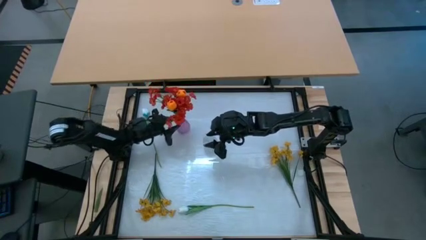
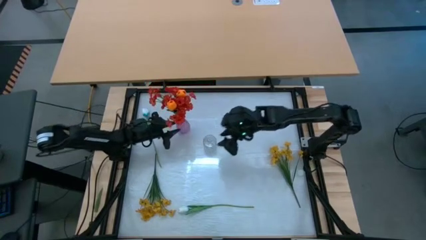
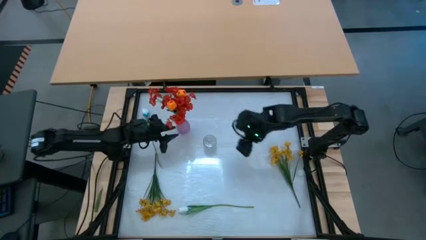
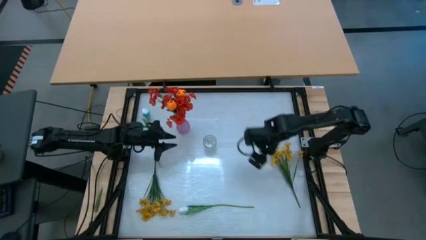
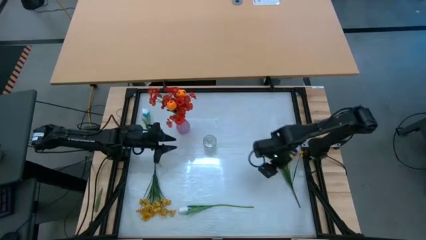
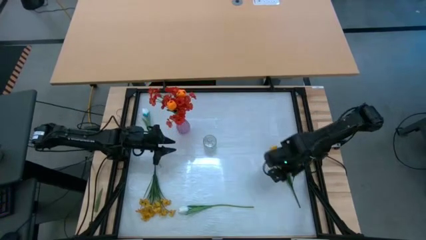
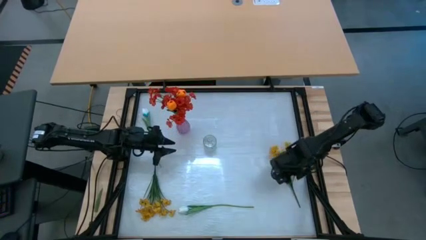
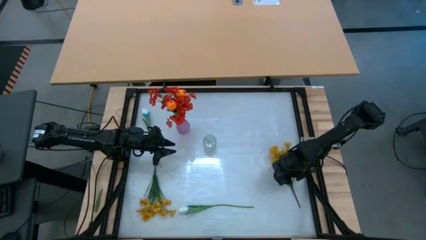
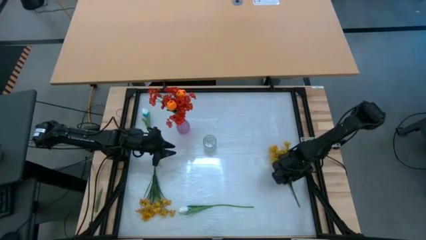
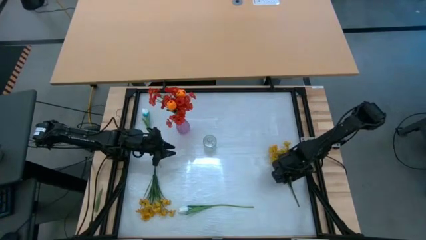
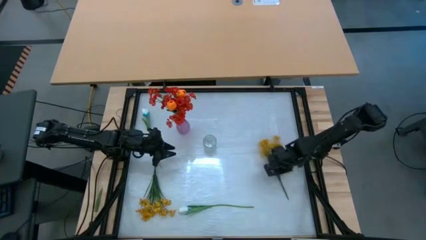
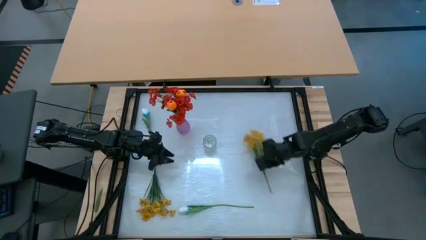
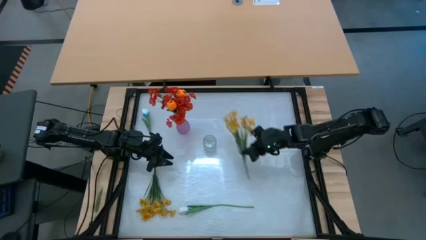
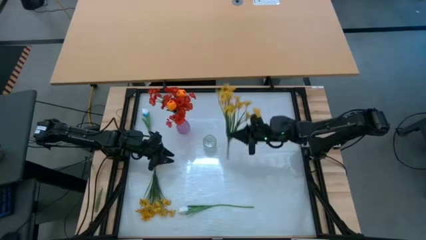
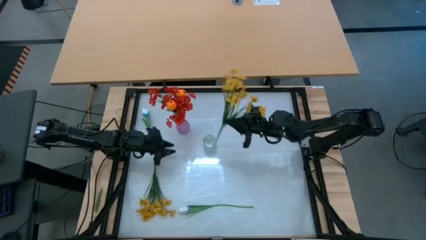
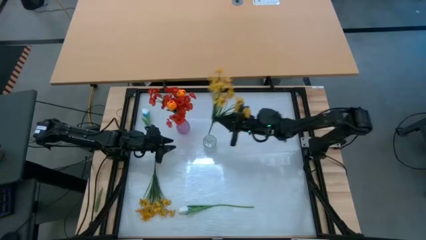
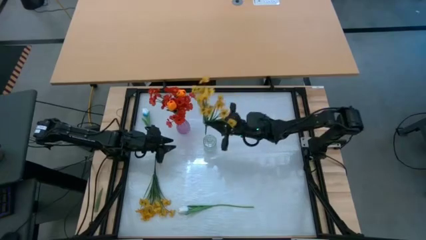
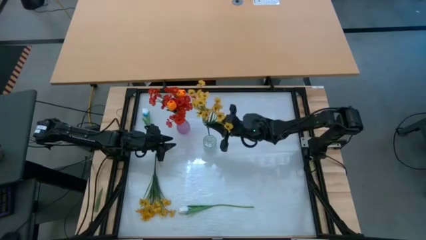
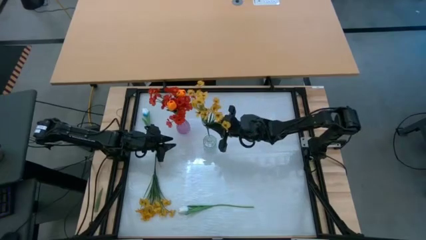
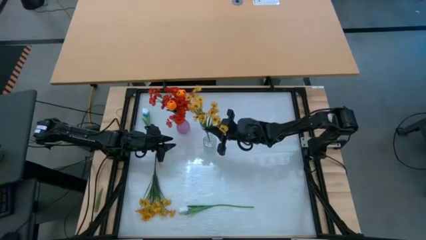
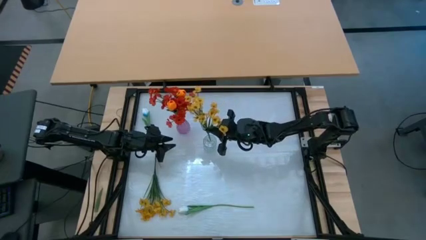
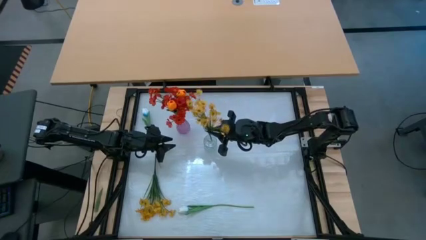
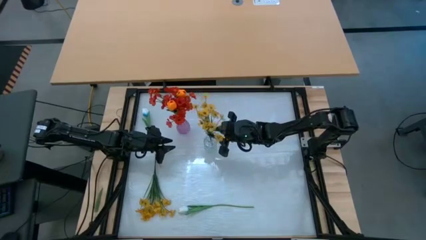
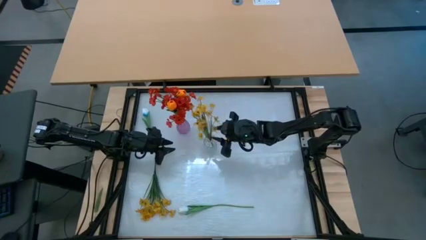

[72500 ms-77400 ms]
Task: Sort flowers into vase by color
Put the left yellow flowers into the transparent vase

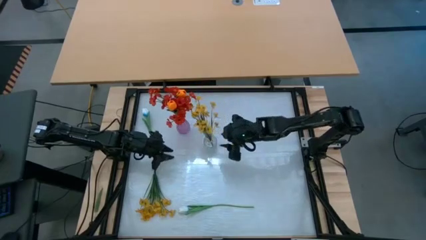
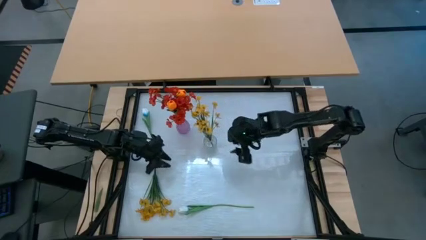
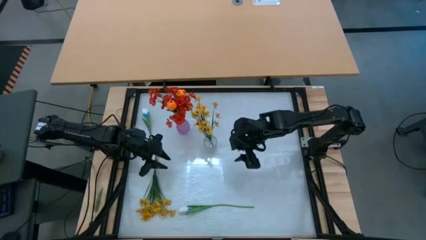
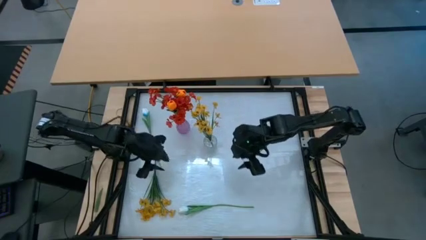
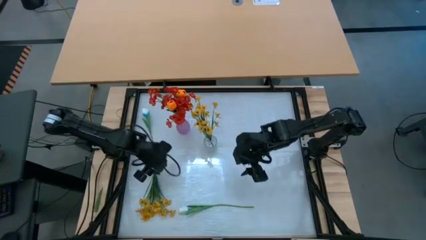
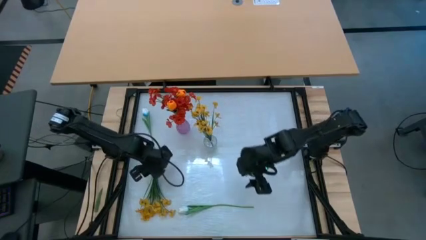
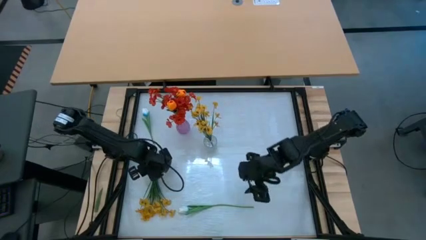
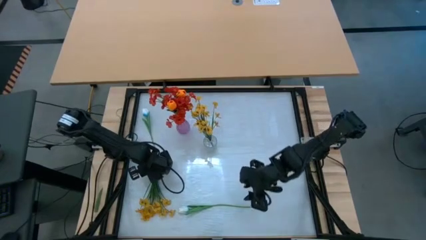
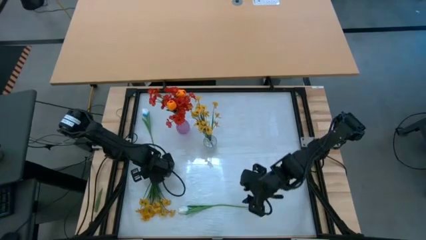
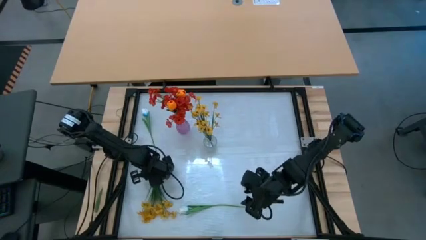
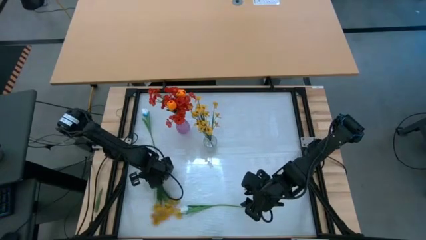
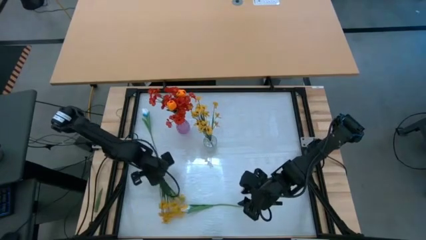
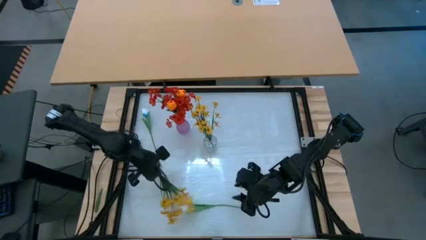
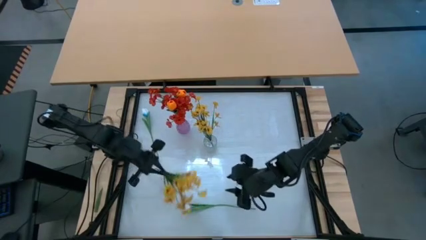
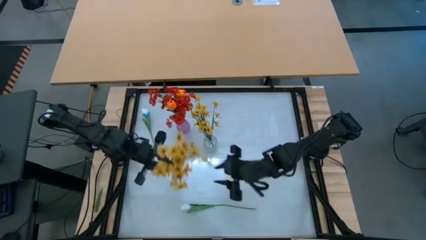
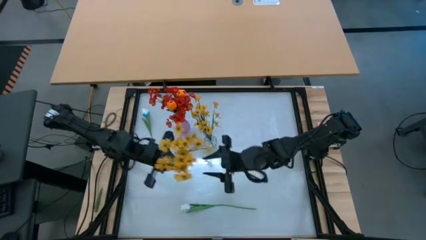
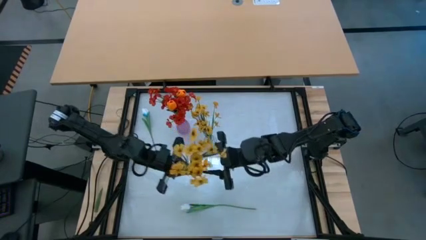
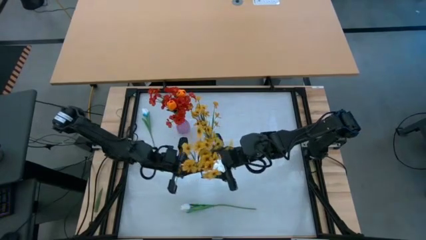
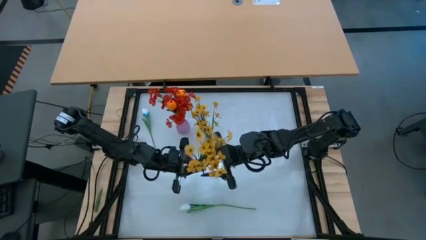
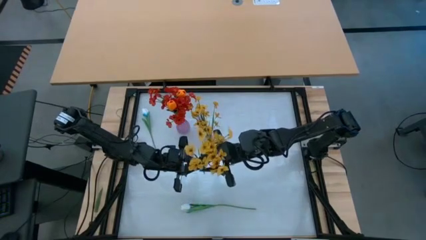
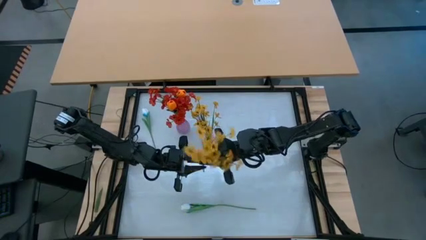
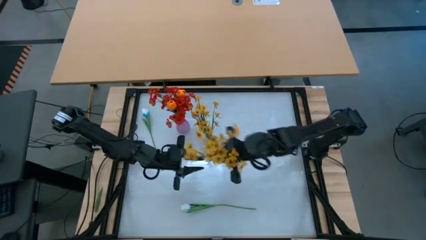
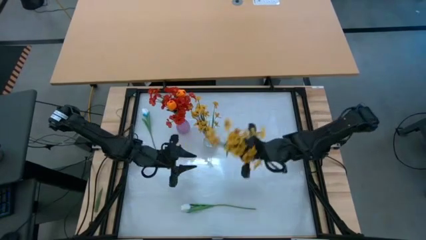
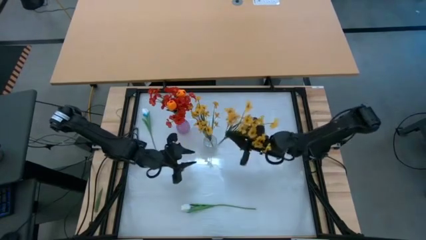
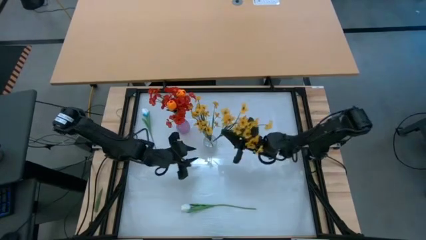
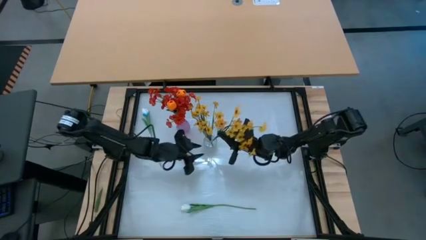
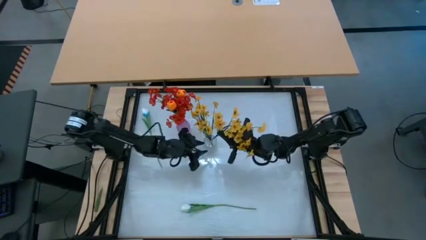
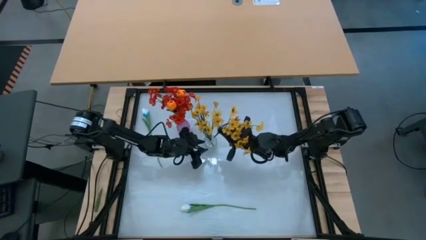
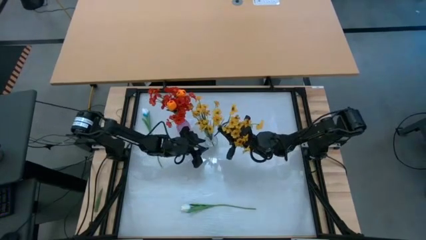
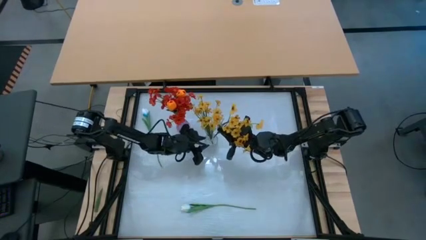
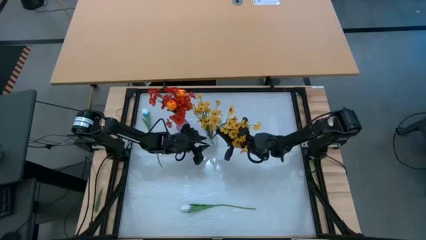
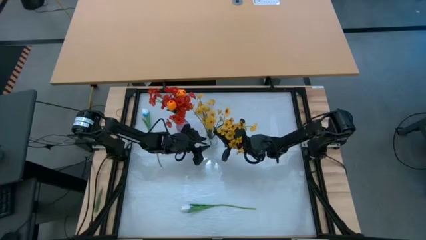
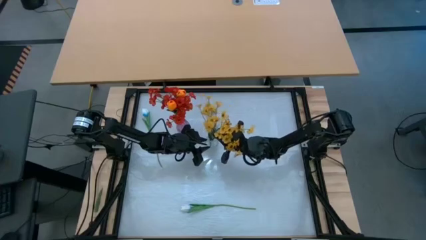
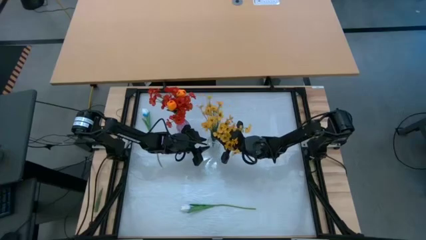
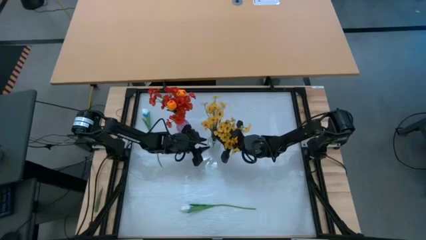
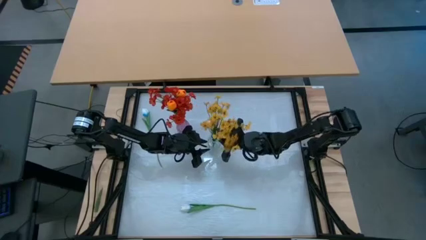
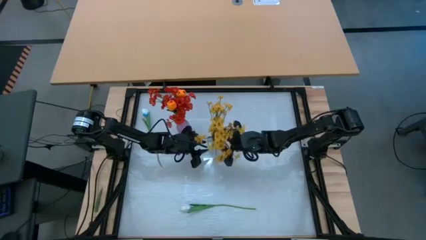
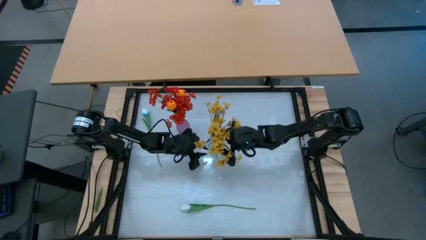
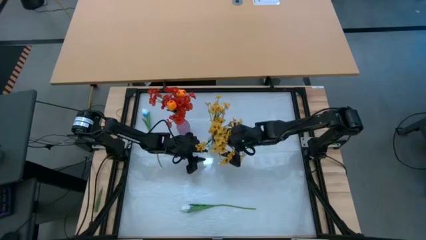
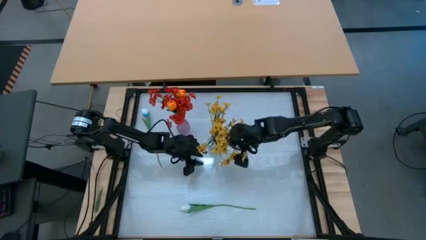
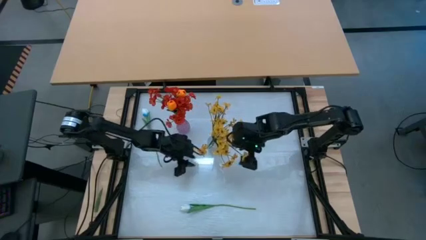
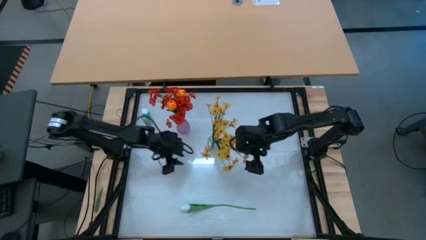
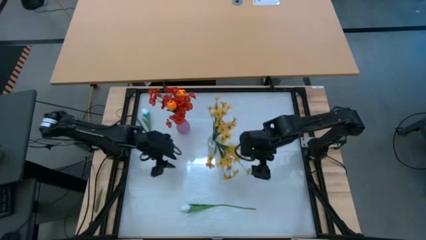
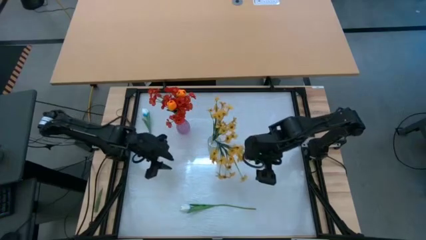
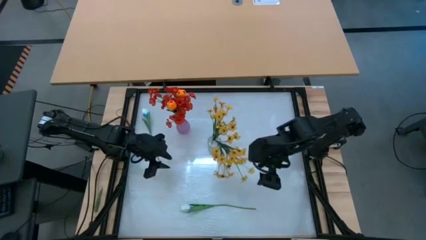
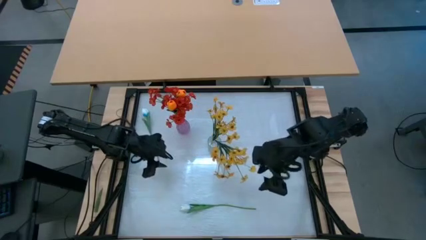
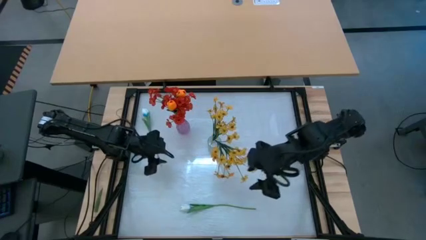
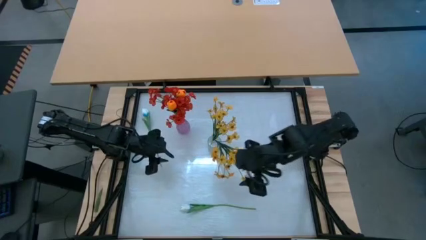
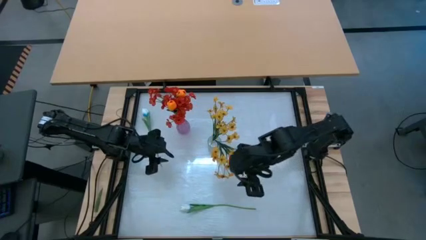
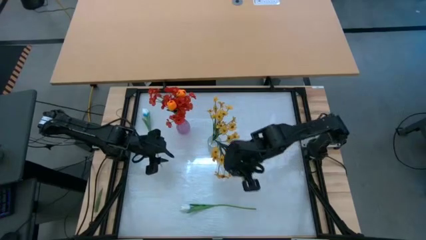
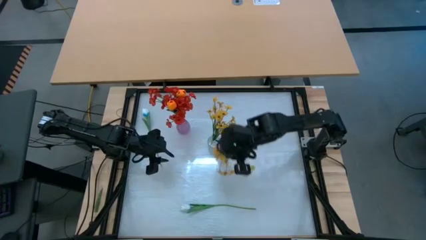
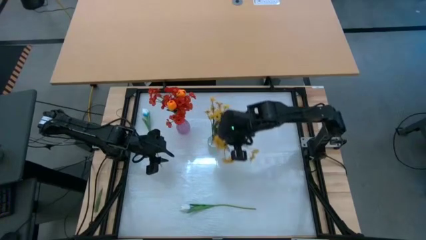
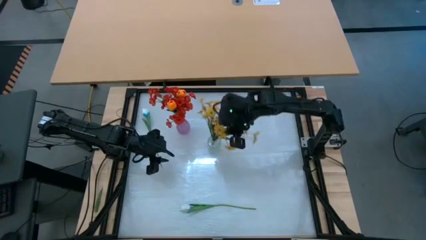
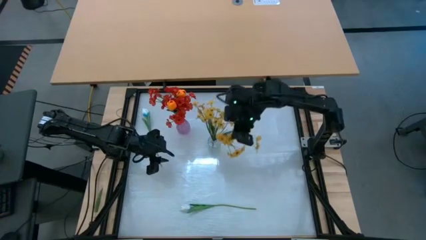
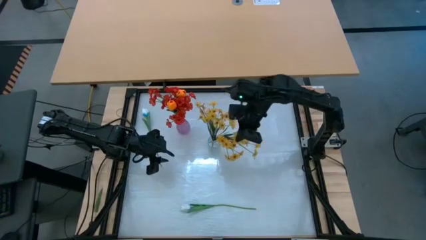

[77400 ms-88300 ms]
Put the yellow flowers into the transparent vase
